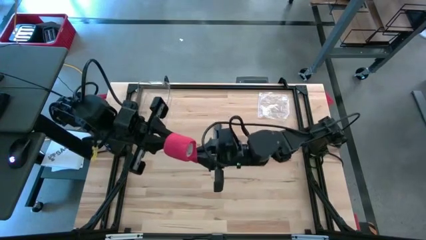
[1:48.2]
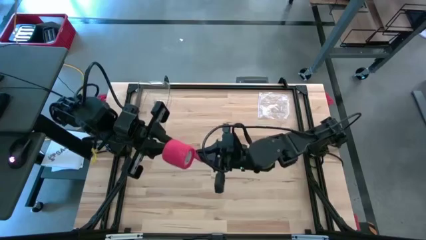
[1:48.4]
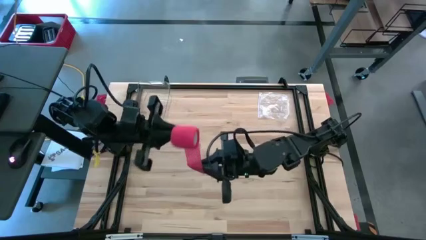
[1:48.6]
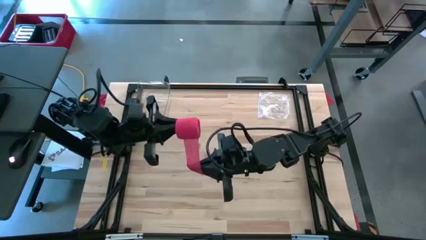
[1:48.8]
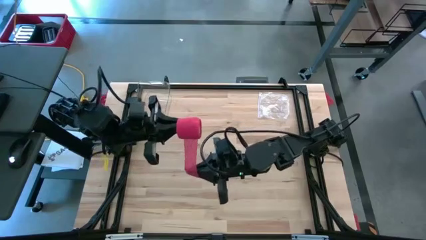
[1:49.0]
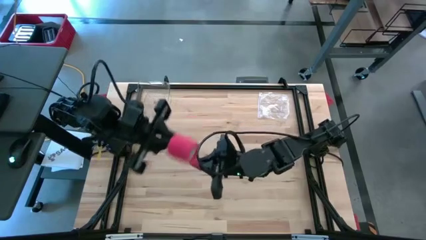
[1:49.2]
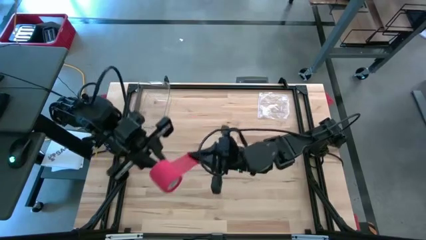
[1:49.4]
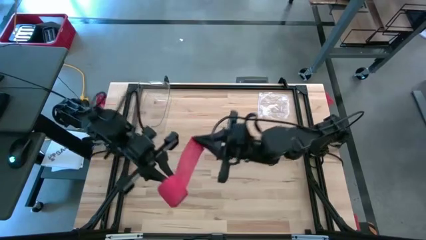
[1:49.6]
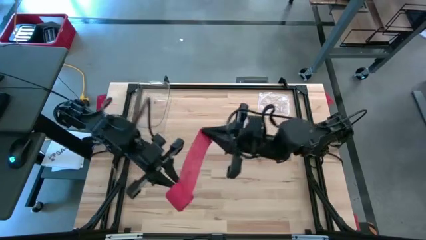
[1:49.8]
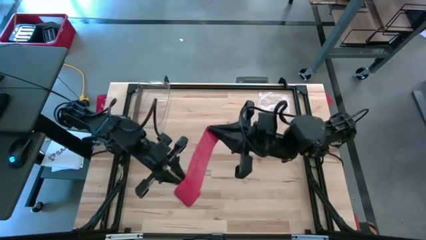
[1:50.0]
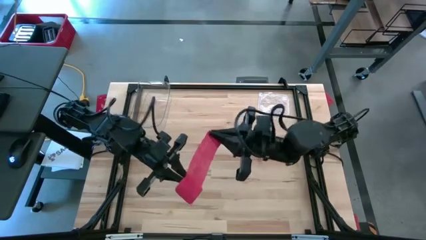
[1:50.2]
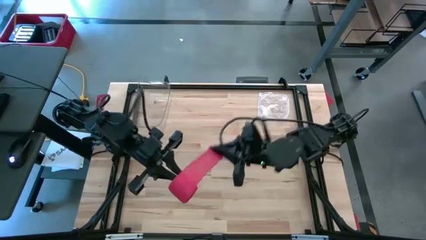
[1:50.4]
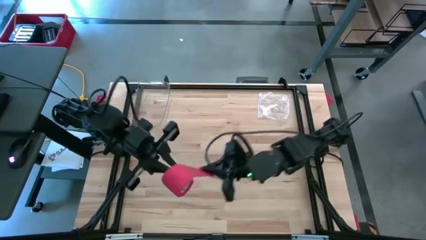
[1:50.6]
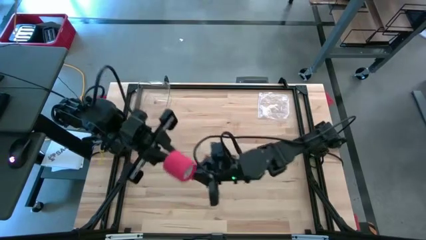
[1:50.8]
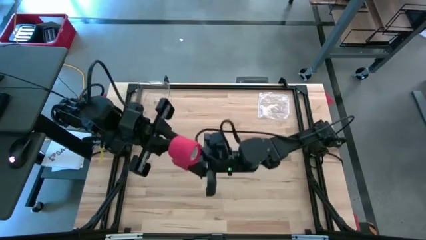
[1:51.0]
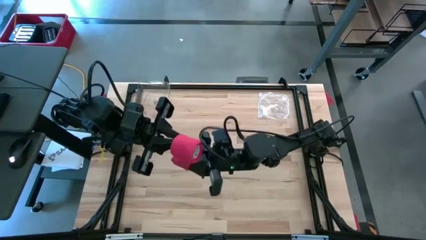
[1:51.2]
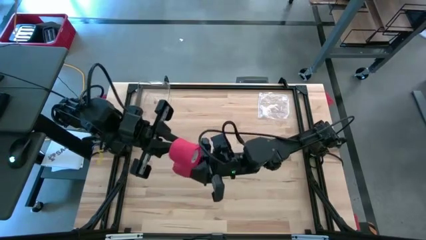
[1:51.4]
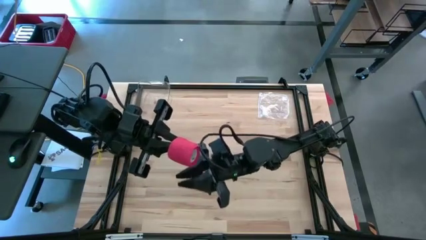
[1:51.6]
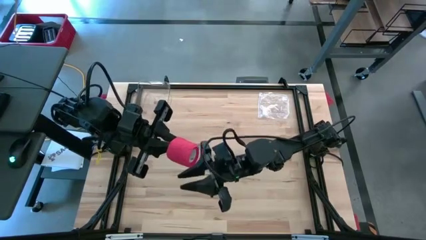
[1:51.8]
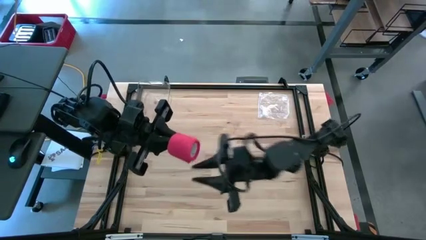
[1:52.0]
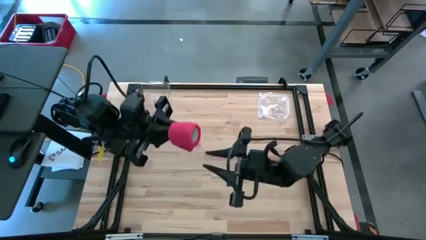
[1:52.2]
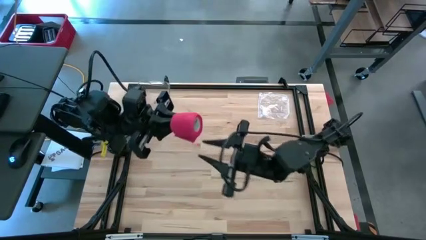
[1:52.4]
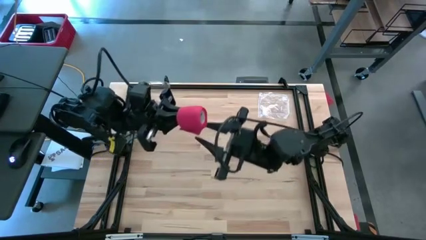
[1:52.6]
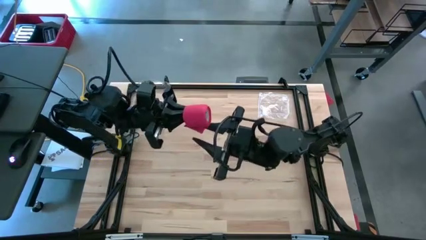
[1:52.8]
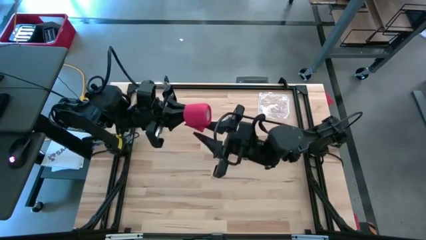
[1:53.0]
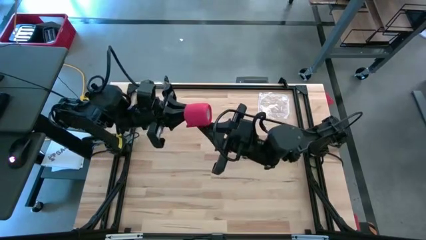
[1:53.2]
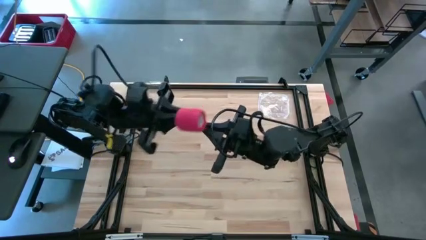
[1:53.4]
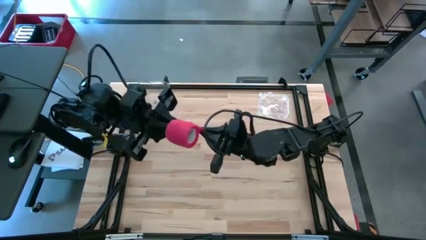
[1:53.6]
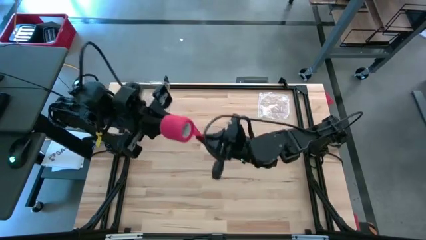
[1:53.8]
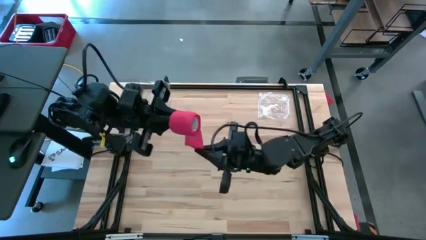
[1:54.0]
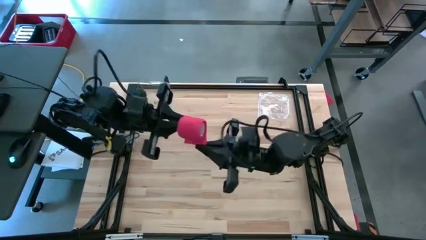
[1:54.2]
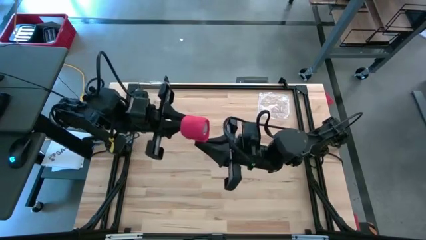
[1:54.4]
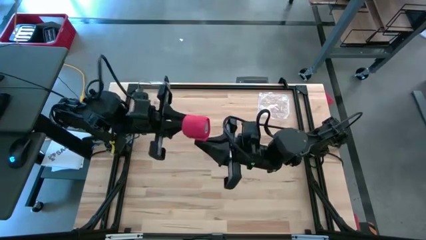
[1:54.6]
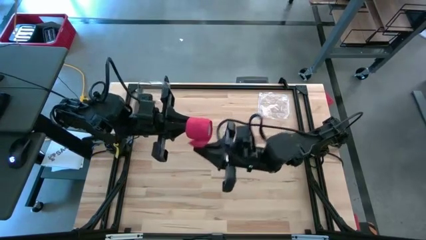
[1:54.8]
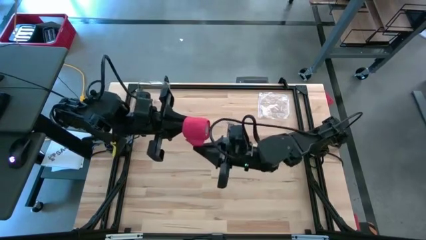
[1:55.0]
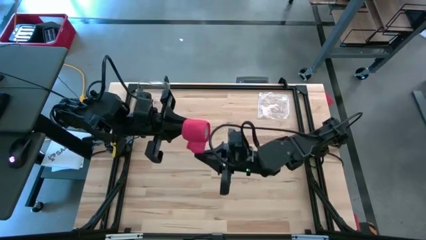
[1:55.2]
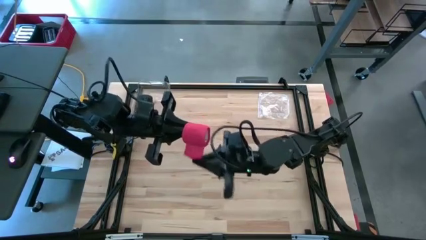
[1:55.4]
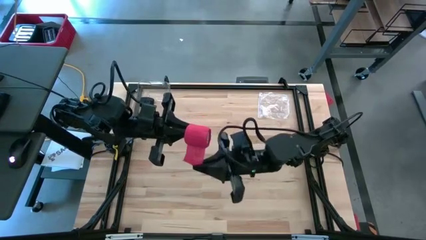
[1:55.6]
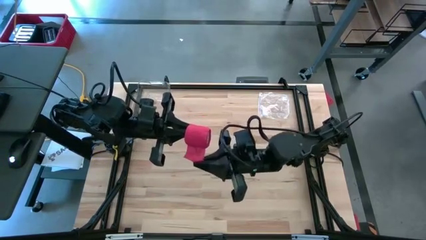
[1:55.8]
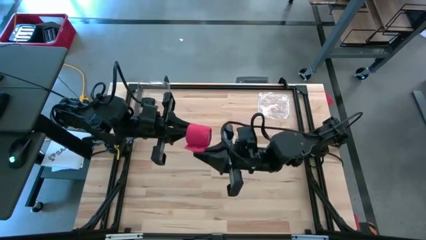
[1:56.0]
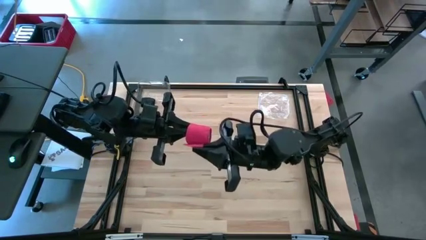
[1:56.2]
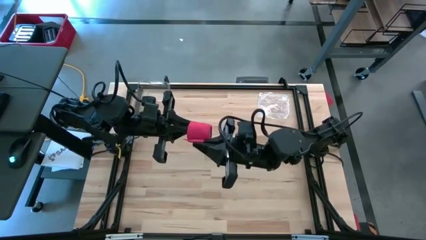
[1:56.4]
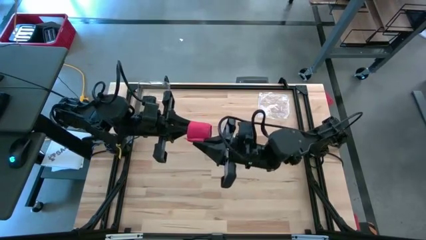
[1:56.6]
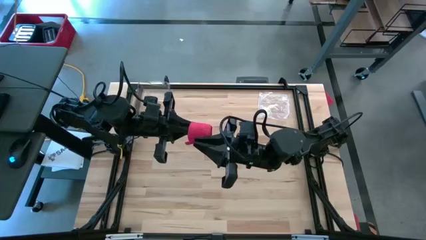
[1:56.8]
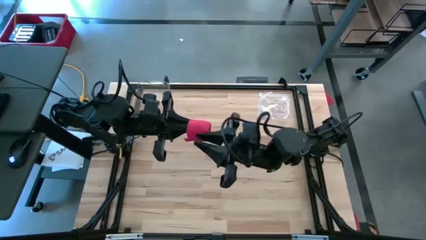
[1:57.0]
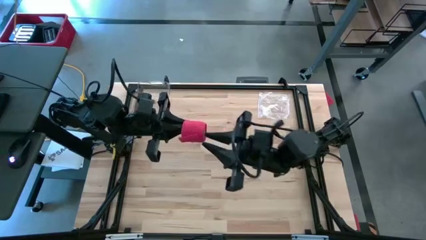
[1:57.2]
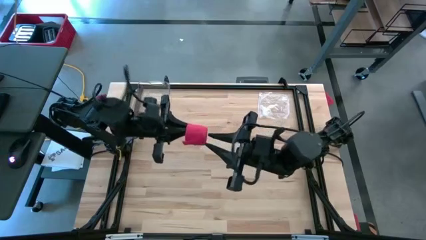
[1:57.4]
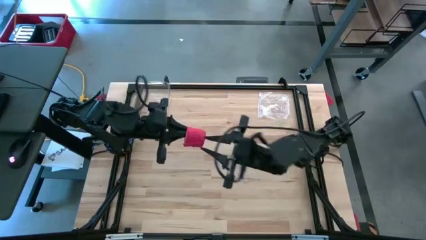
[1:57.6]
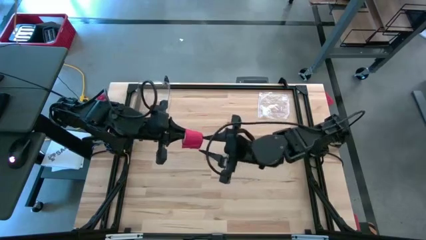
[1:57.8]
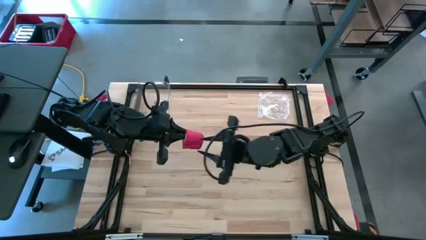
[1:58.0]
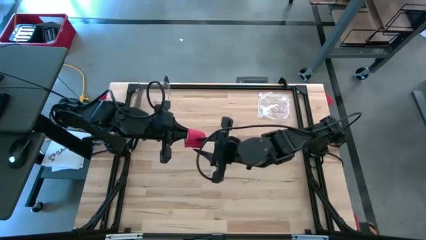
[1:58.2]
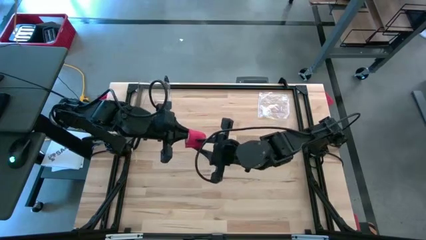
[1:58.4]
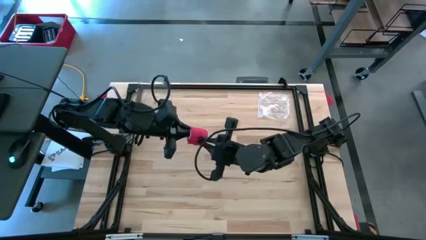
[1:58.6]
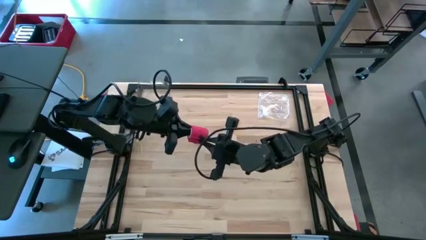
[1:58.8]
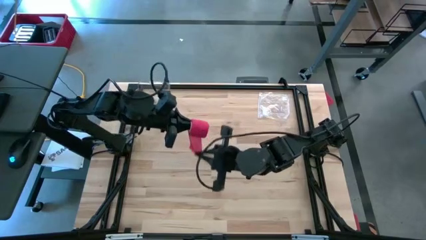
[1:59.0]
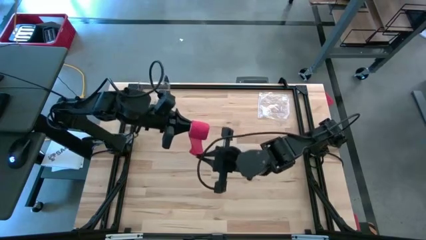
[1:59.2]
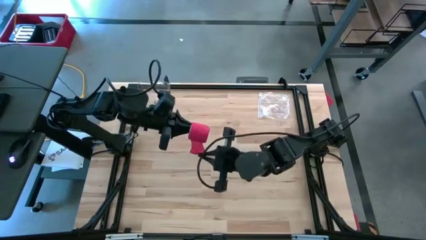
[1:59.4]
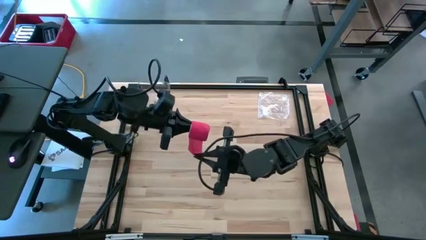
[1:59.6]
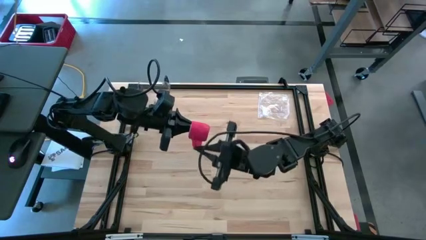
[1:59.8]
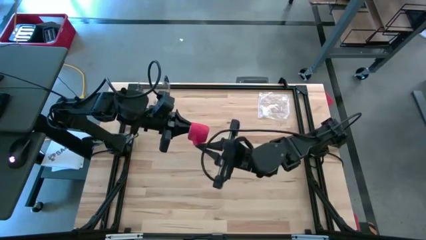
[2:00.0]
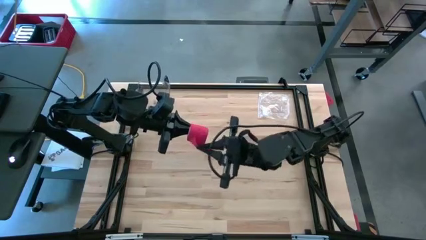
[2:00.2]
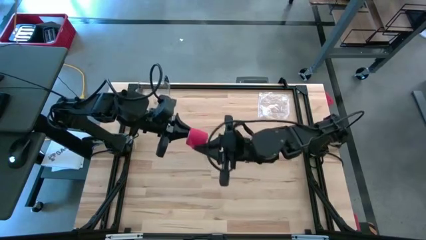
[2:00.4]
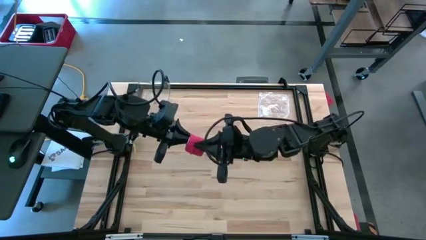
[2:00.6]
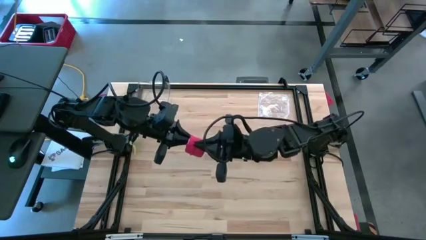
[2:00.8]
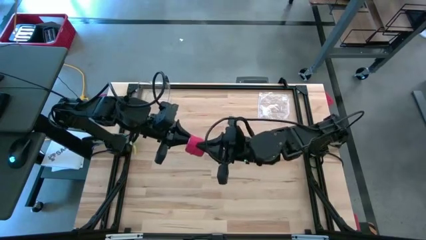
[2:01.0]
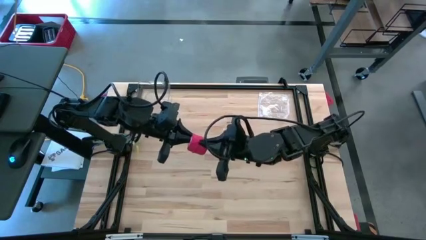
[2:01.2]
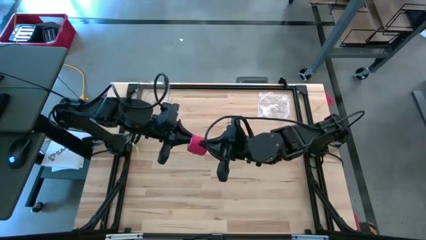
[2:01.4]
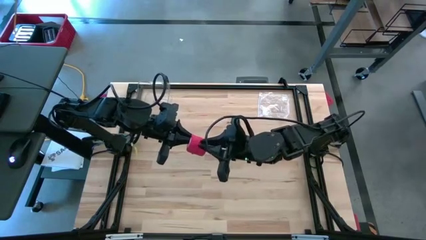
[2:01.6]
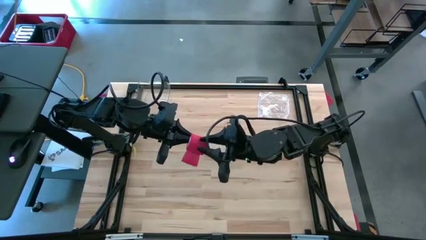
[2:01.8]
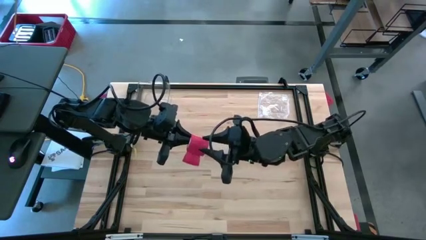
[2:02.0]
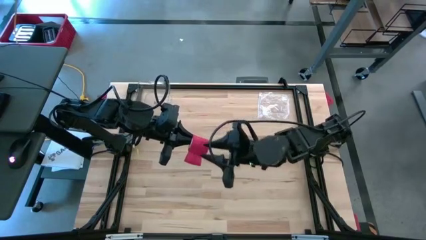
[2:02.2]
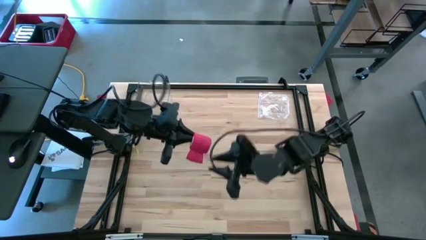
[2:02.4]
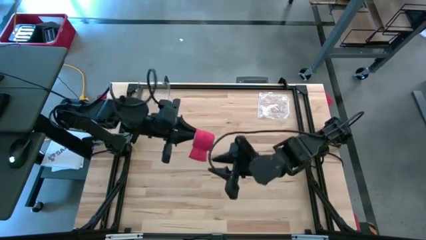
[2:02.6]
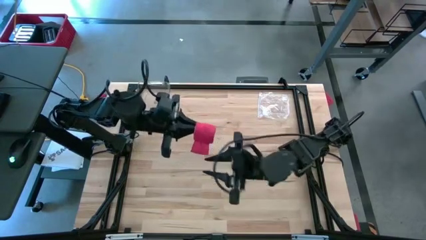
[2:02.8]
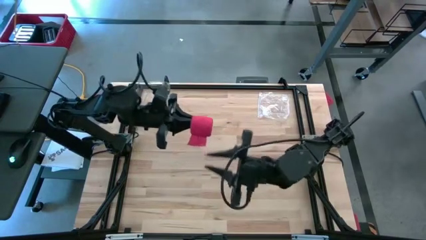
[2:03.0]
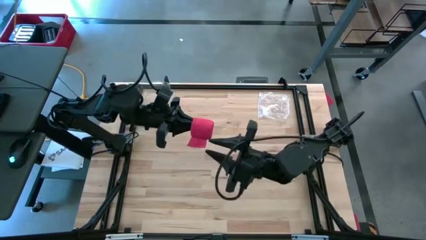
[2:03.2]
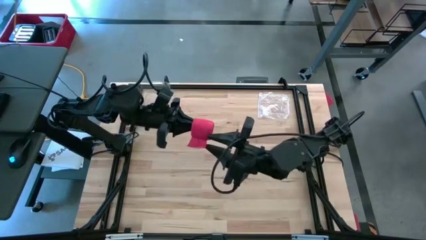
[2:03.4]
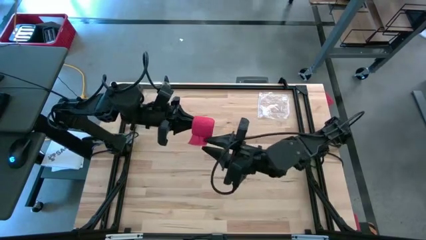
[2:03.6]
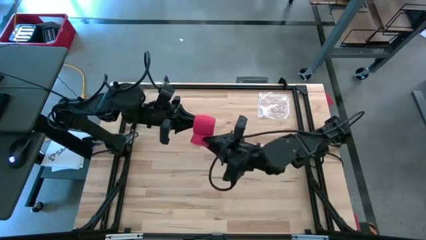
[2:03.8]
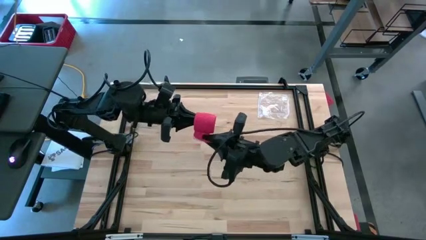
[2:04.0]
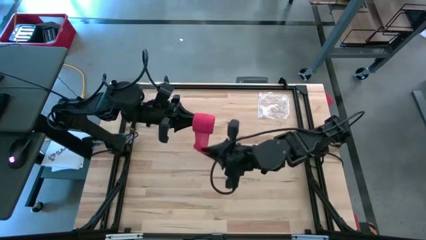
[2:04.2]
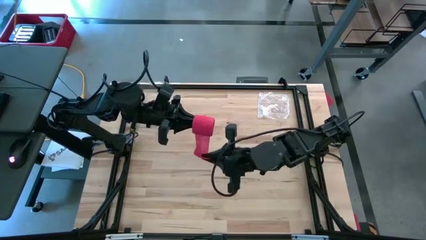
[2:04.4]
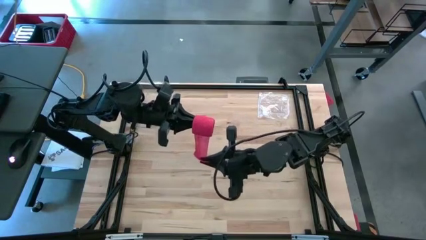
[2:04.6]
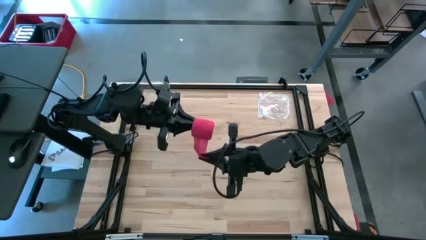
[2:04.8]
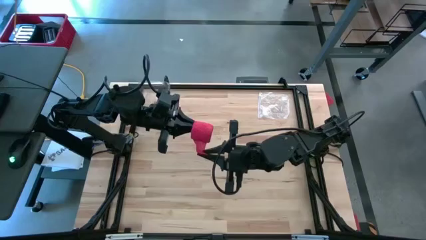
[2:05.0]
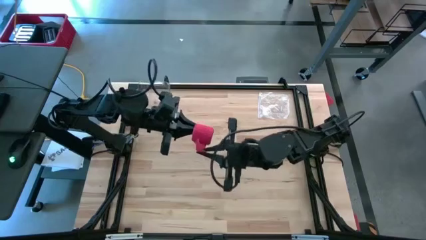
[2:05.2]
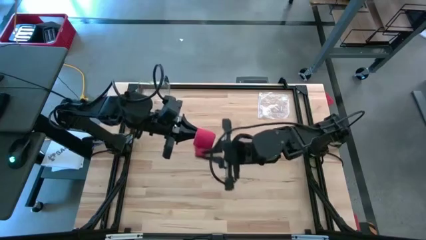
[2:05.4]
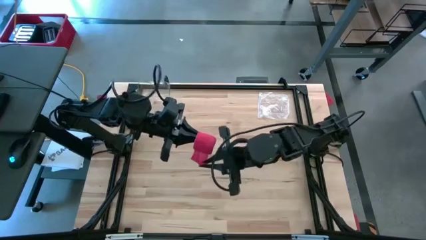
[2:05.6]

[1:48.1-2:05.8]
Task: Roll bandage
Roll the red bandage
